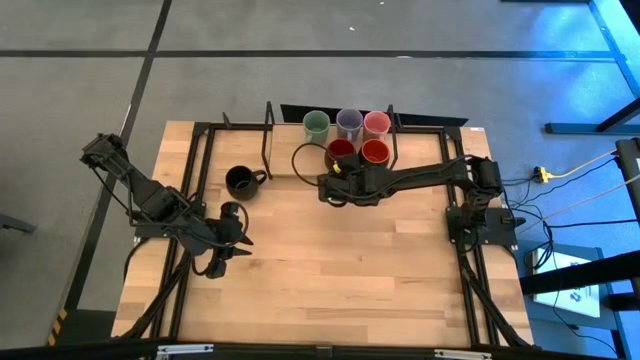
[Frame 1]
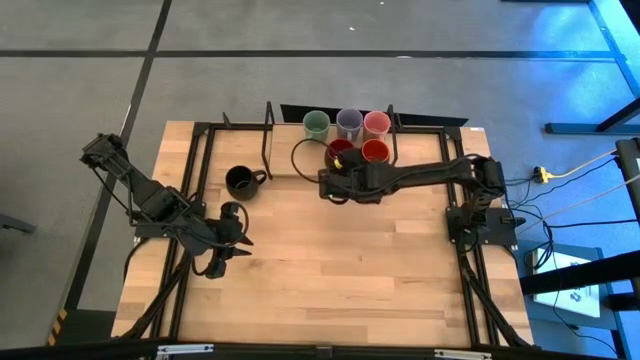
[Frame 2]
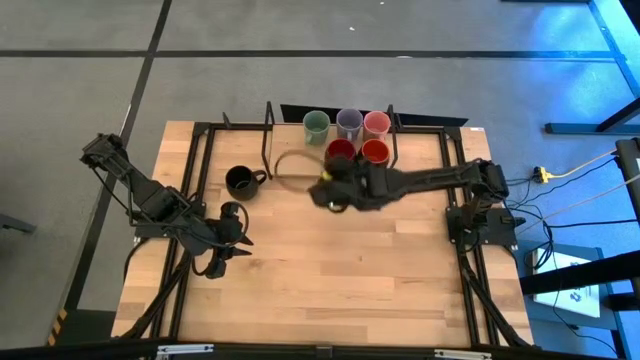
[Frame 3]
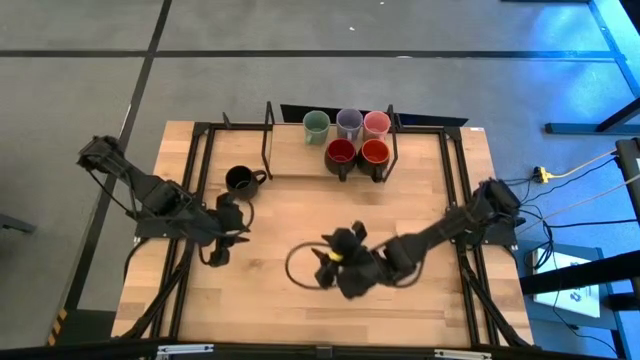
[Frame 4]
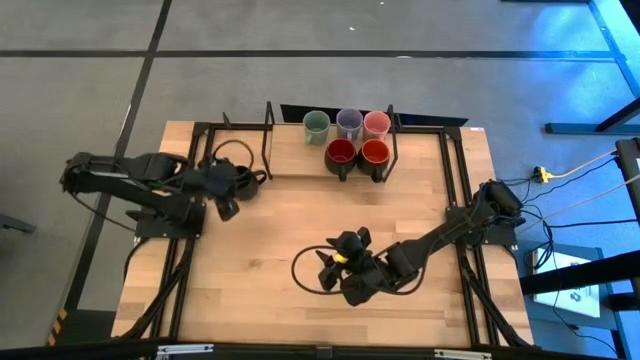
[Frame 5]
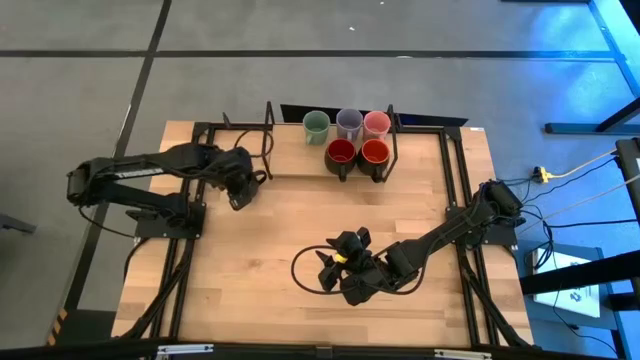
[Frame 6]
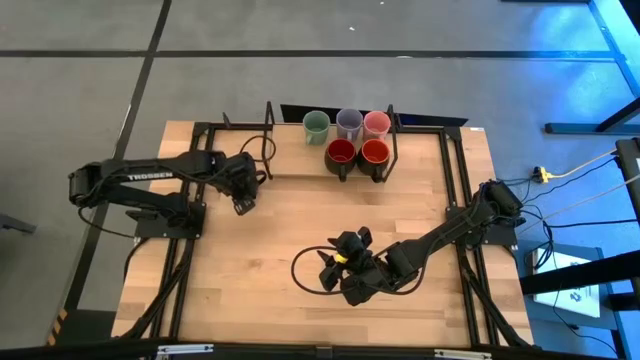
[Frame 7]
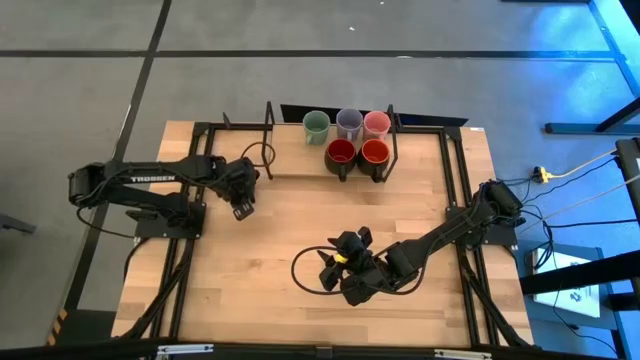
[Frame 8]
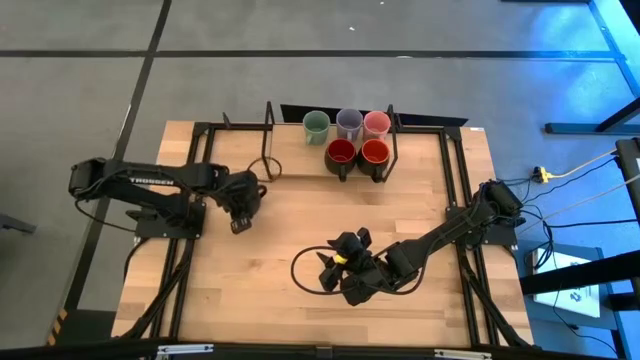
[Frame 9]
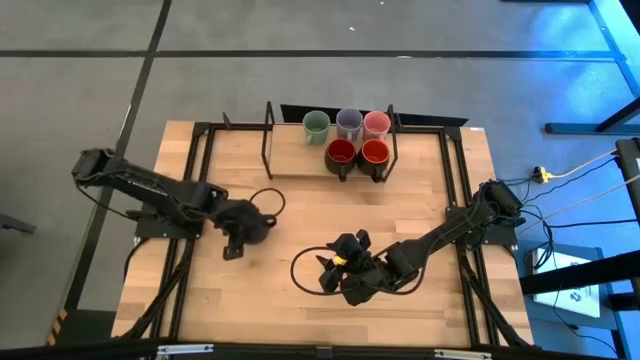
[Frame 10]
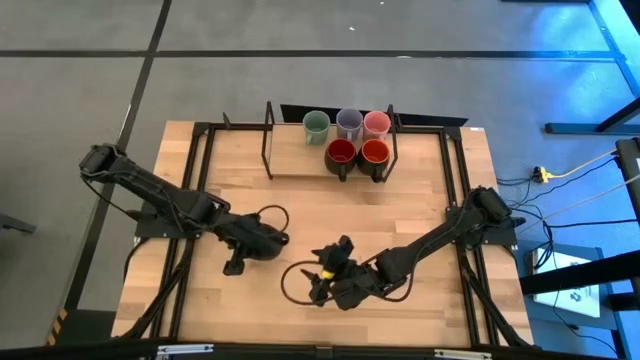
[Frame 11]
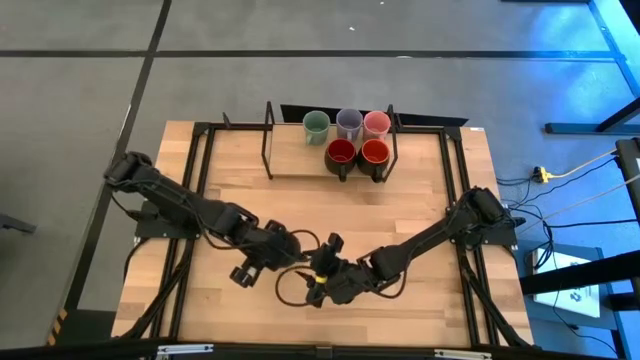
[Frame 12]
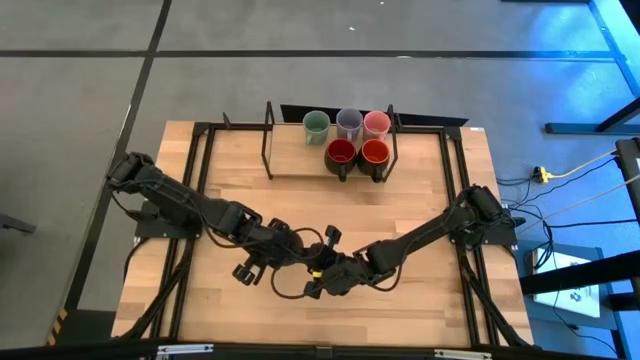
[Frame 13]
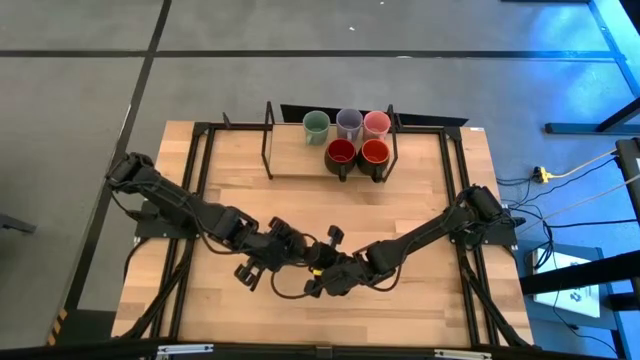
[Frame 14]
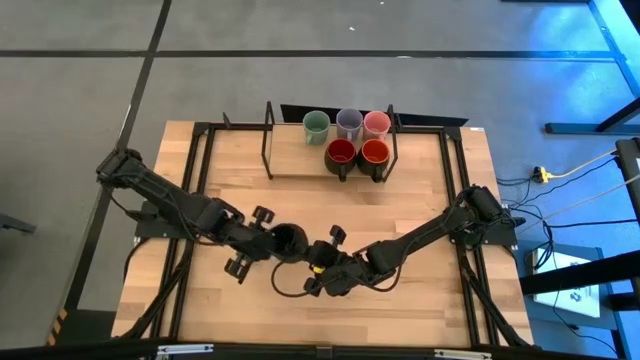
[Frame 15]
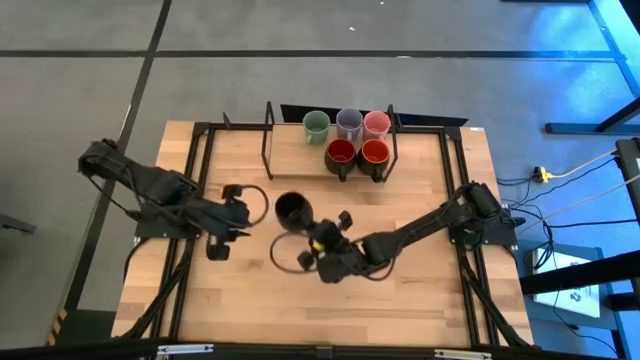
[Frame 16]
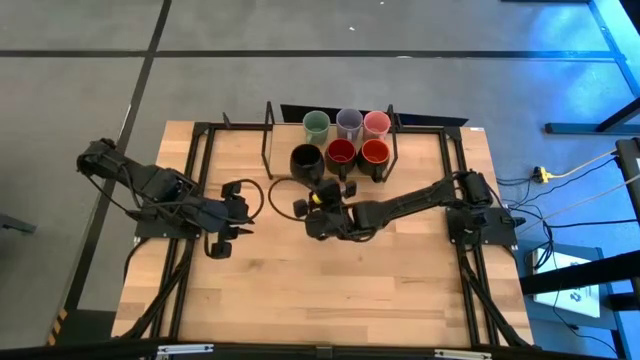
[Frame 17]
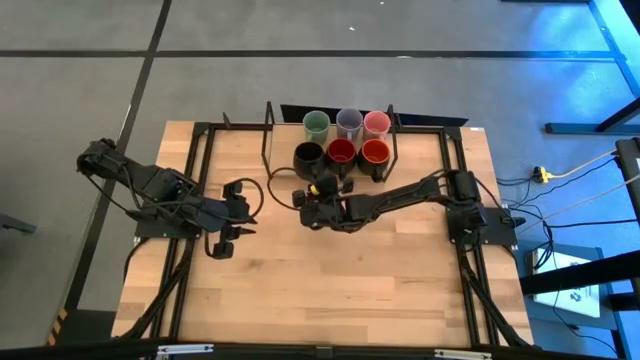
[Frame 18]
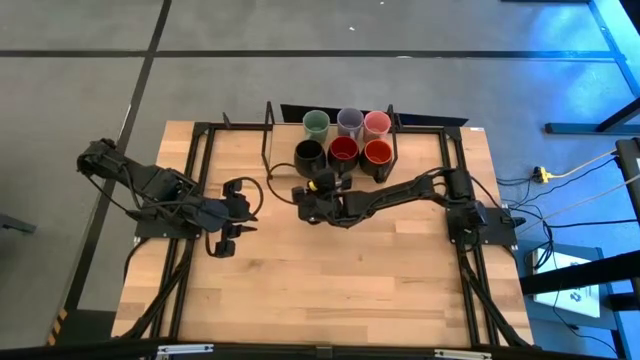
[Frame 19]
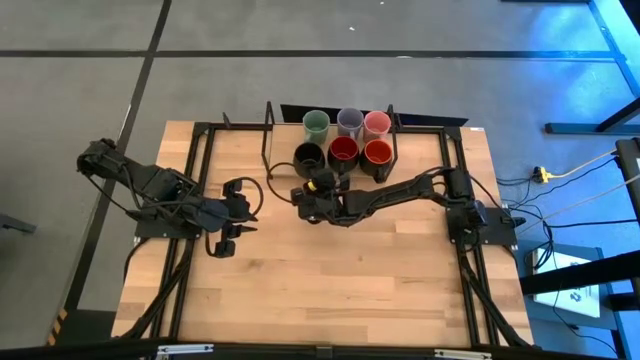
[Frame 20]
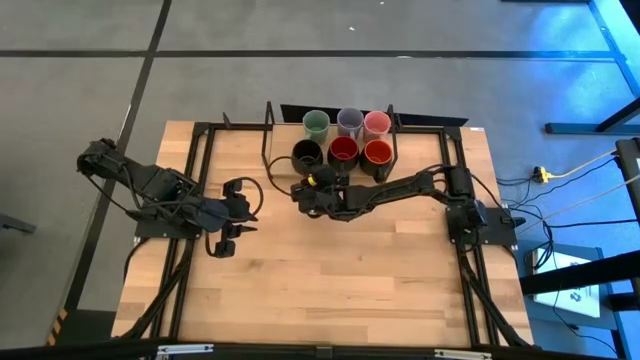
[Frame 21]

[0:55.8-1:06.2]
Task: Place coffee mugs
Put the black mug on the shelf

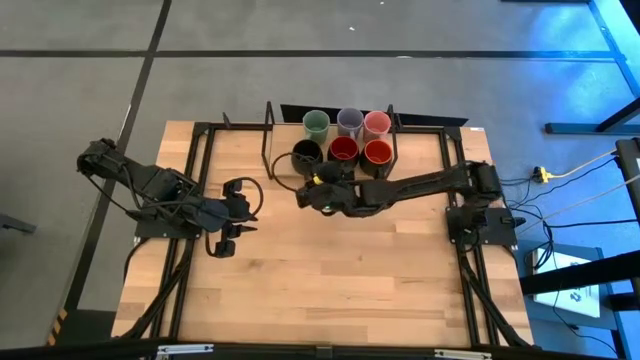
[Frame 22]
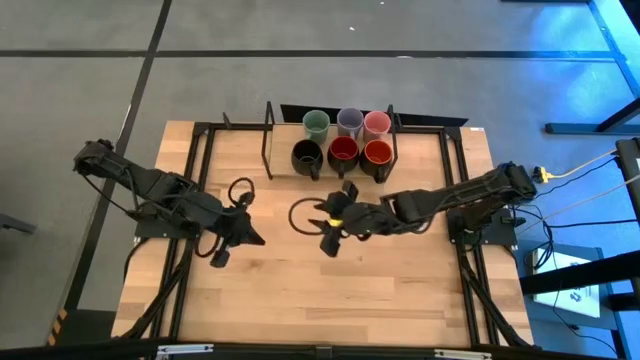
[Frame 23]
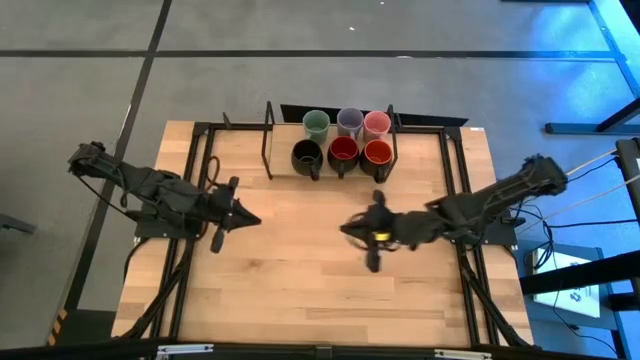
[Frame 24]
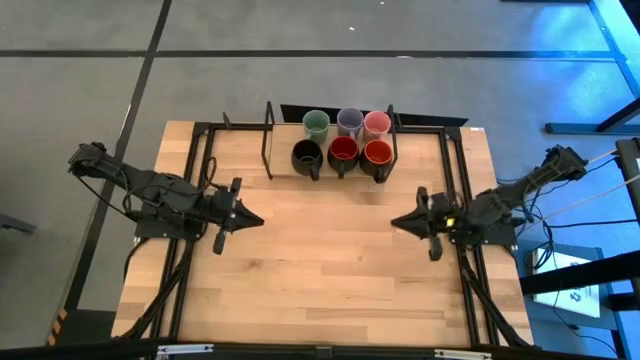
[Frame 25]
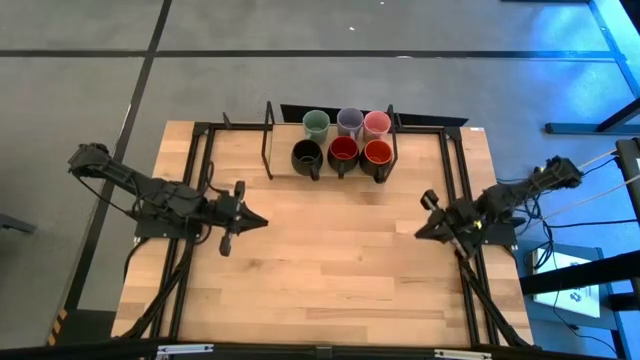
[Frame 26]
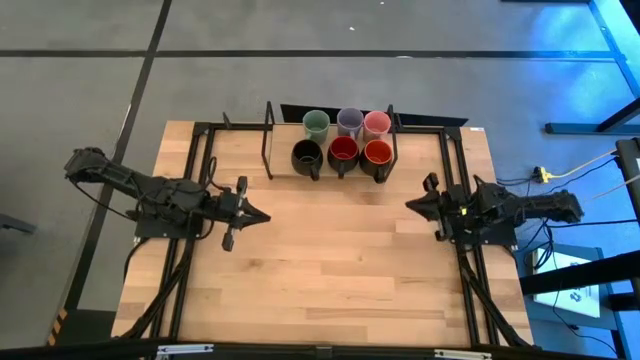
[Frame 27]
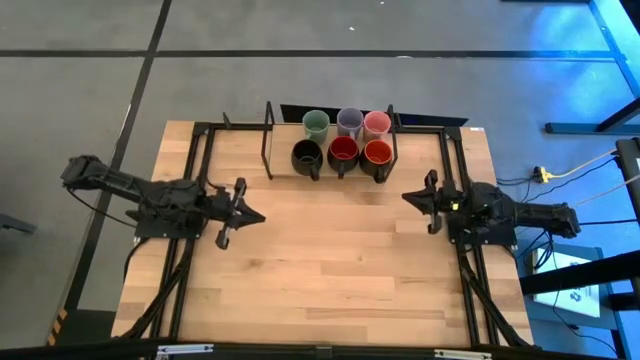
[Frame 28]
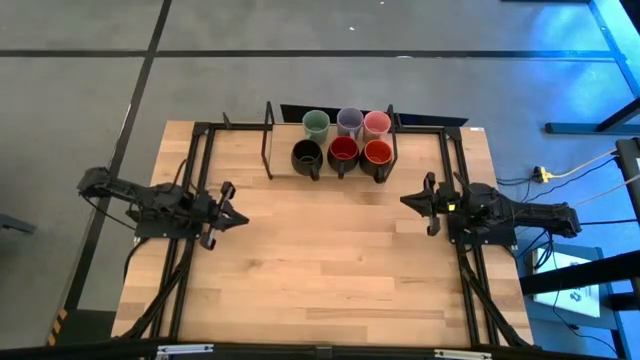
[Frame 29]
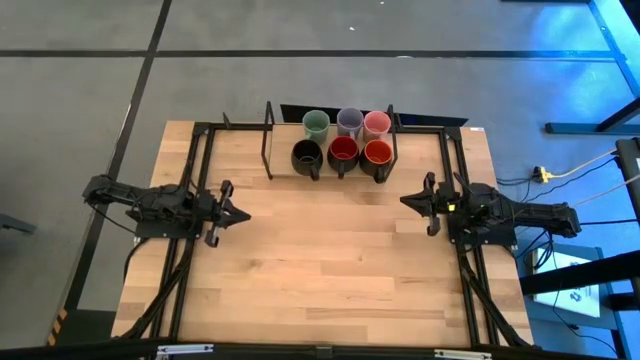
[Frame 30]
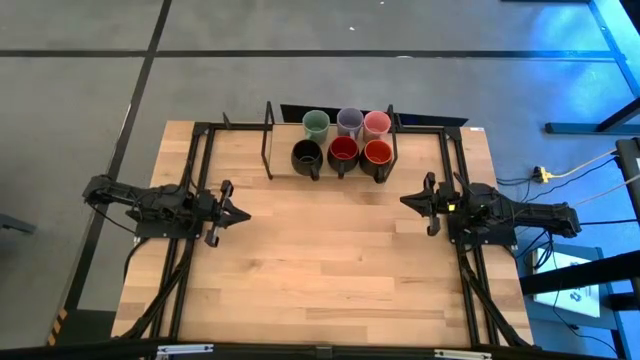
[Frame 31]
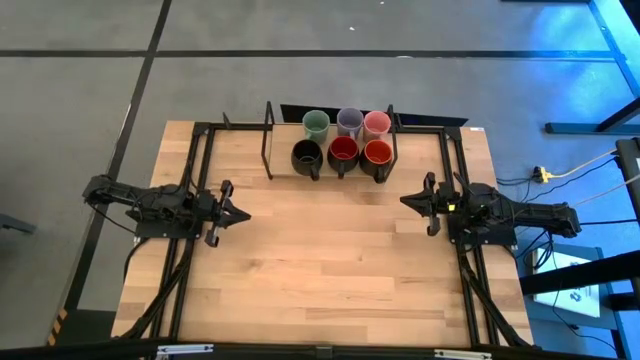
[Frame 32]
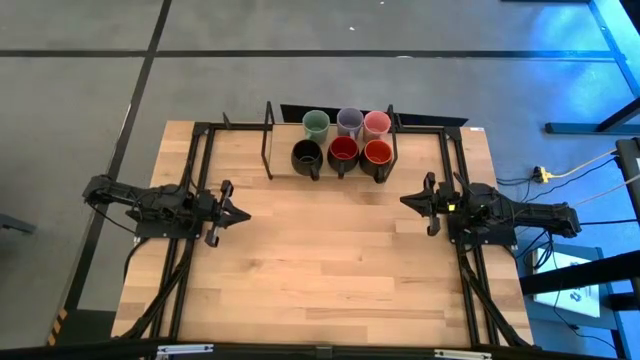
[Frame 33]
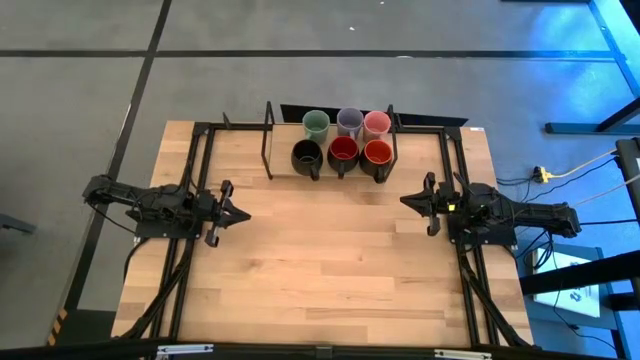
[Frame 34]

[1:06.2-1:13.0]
Return to Home Position
